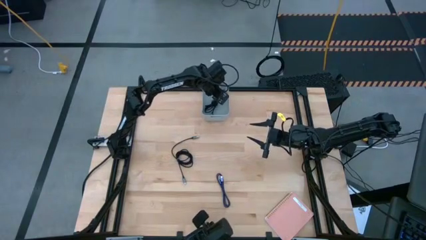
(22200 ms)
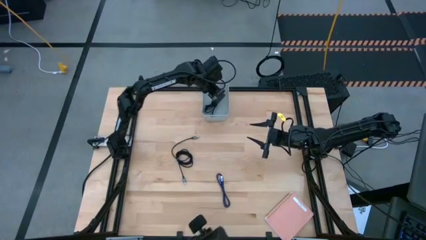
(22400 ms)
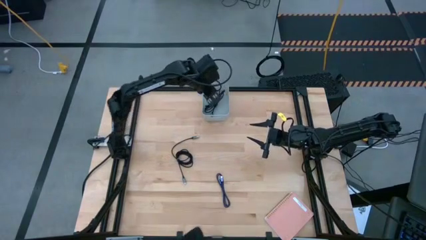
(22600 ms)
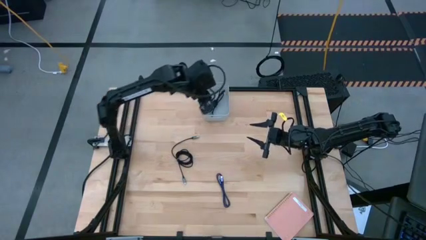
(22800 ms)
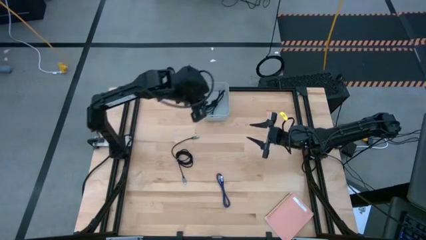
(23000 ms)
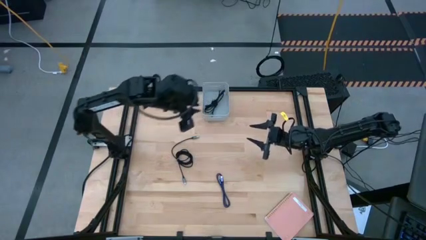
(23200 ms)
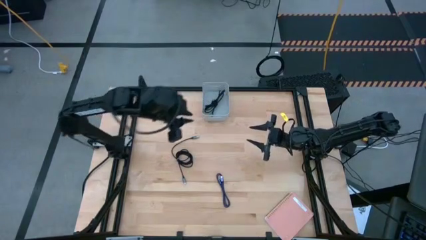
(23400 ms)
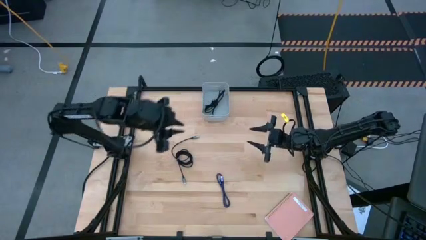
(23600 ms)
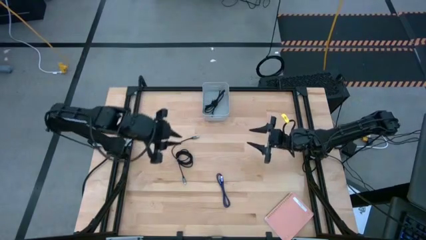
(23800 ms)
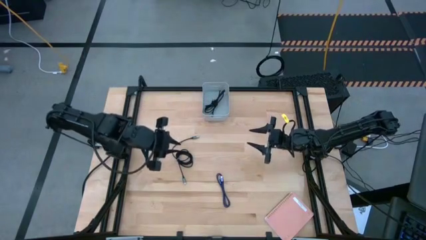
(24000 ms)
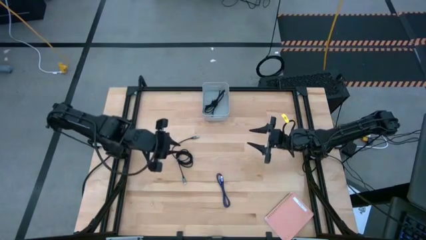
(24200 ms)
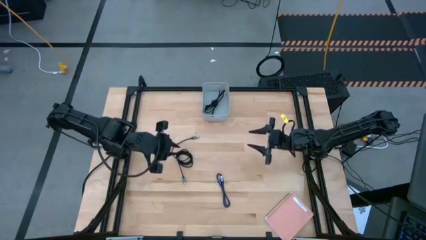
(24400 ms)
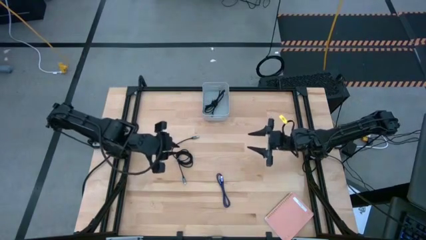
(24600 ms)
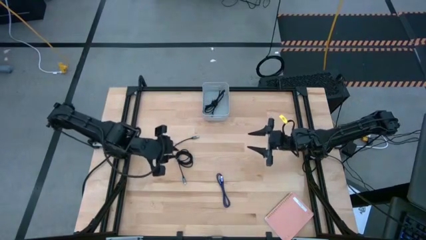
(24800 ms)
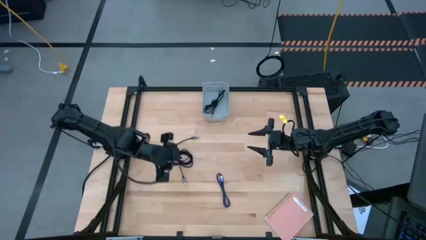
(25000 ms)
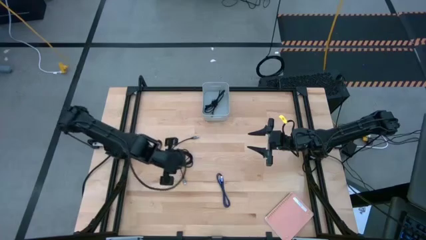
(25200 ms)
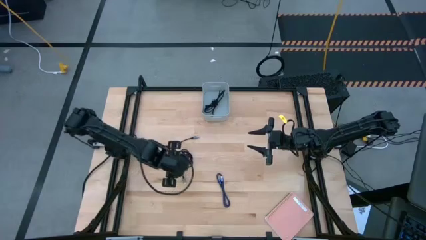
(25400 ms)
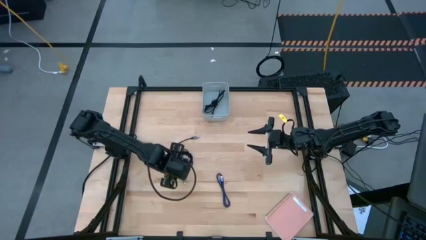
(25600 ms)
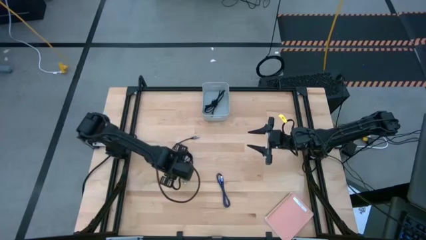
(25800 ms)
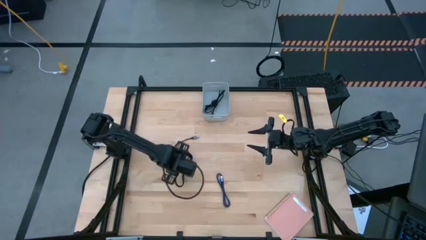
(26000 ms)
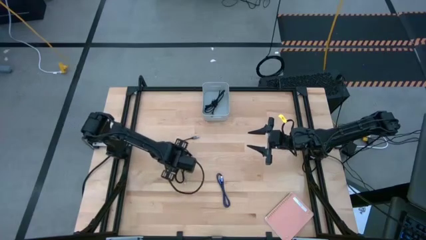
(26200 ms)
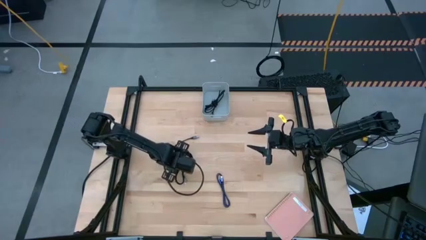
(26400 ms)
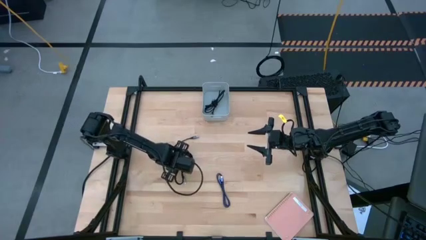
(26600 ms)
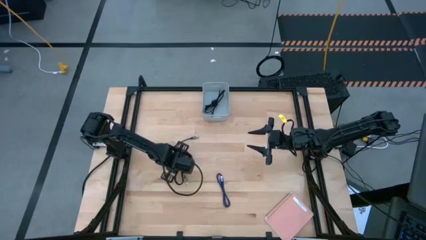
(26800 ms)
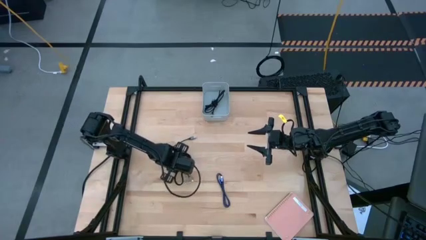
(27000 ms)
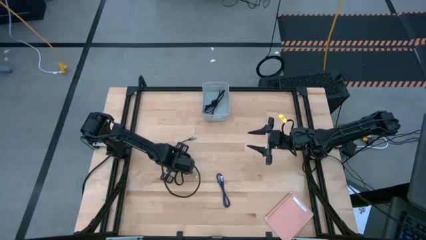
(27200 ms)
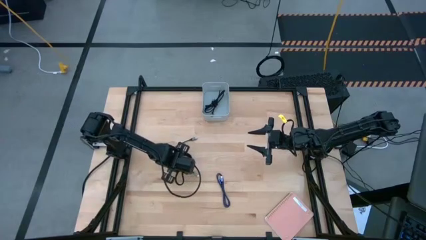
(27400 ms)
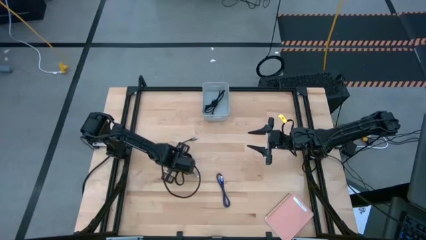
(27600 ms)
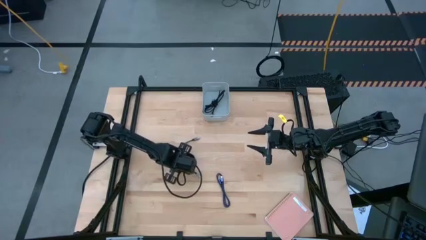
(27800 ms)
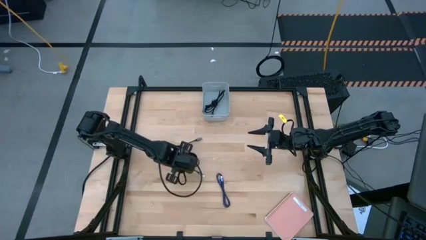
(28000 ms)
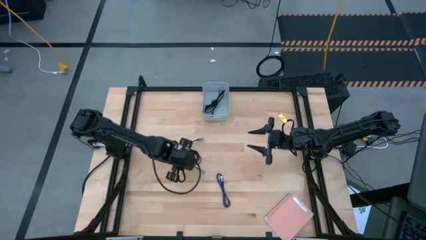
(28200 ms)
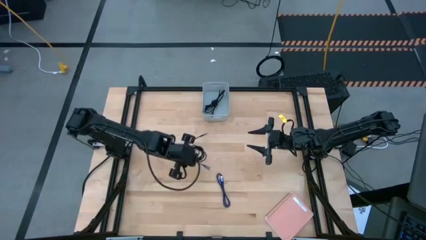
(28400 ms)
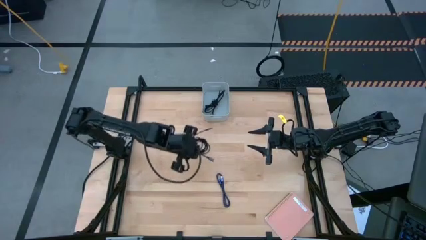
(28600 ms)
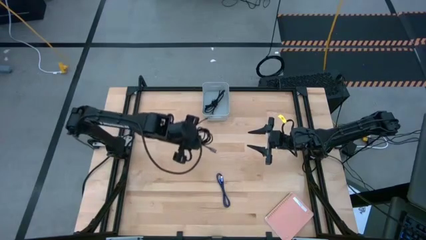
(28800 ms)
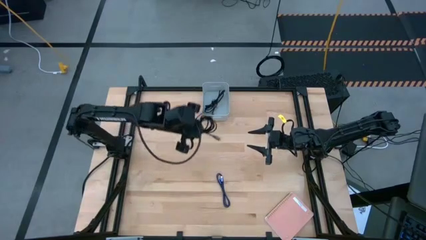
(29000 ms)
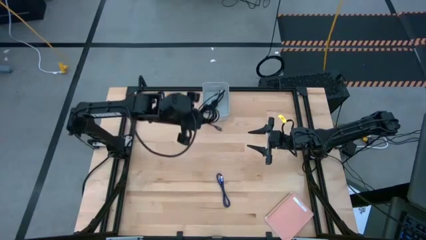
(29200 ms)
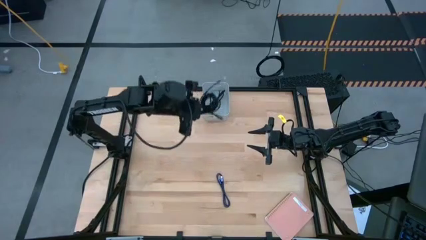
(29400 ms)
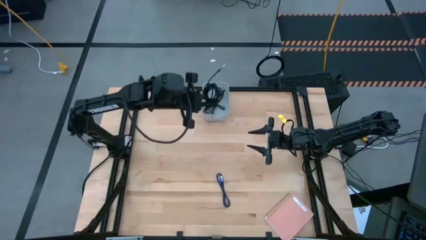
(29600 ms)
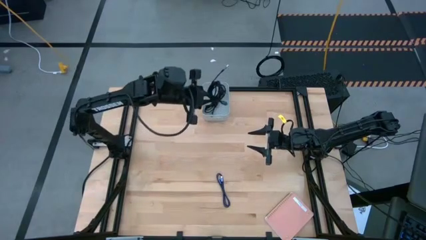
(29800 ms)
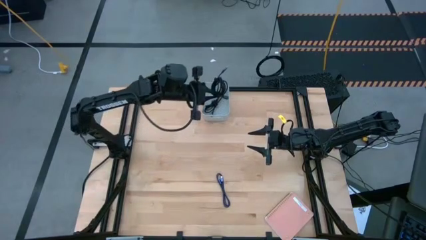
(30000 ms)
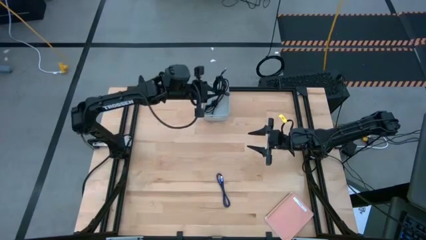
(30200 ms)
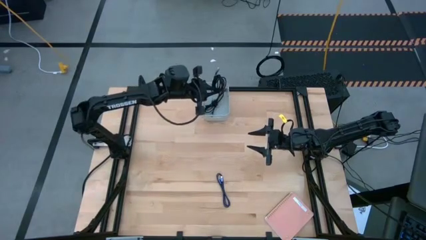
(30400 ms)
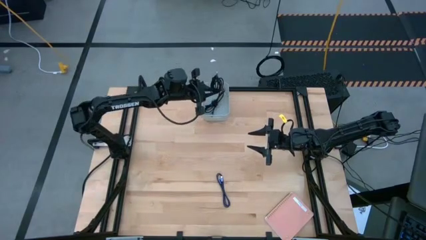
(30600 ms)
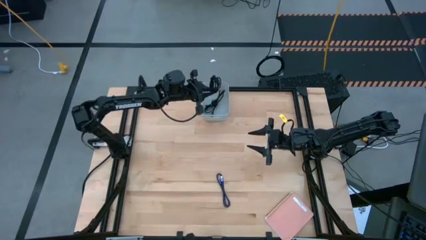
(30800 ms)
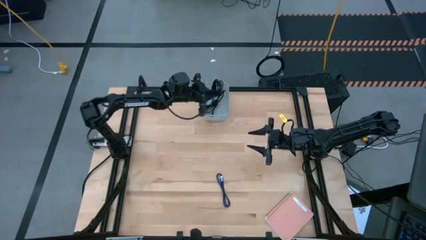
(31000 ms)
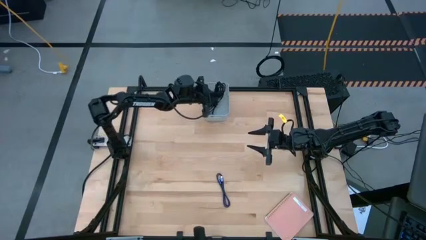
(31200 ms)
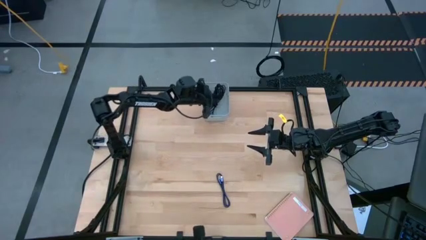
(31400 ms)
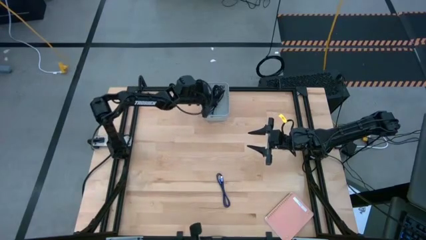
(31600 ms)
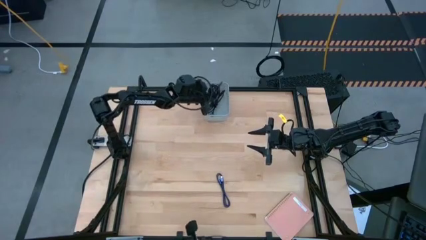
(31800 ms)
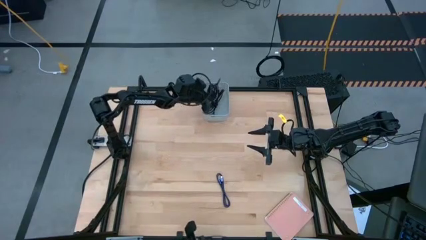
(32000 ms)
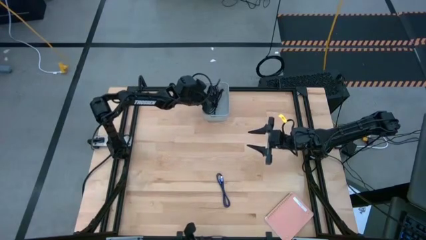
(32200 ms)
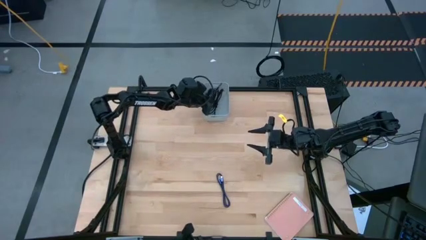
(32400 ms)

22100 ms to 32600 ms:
Task: Pick and place USB-C Cables
Put the black charger cable into the gray bin
